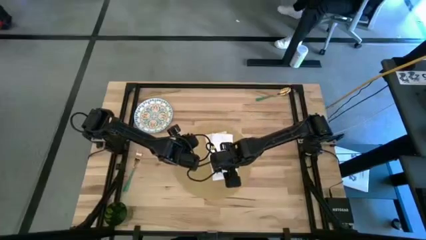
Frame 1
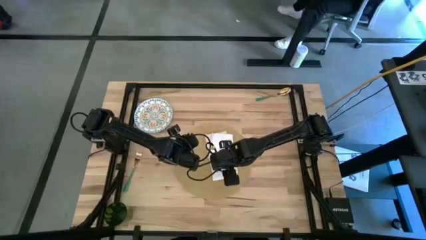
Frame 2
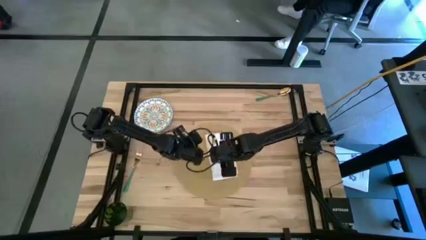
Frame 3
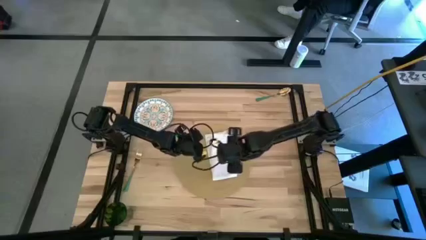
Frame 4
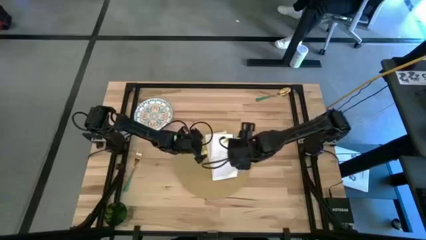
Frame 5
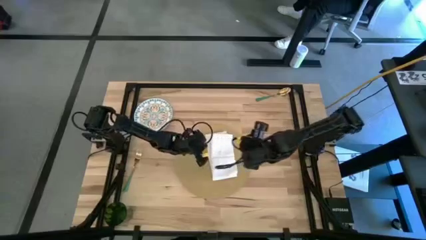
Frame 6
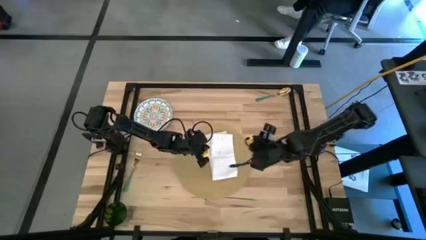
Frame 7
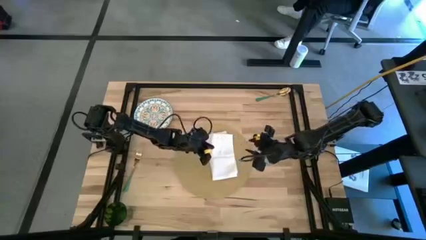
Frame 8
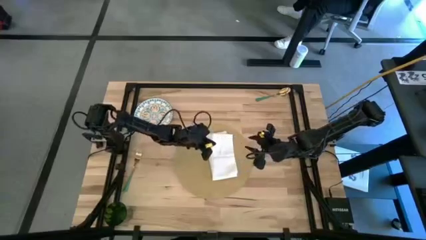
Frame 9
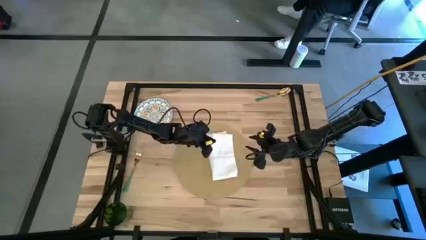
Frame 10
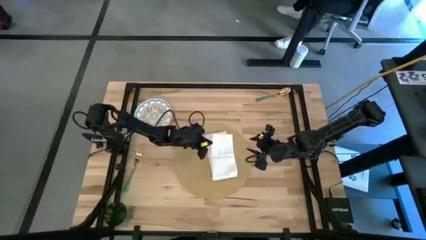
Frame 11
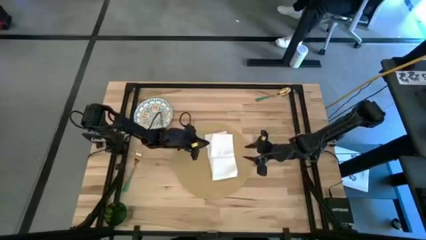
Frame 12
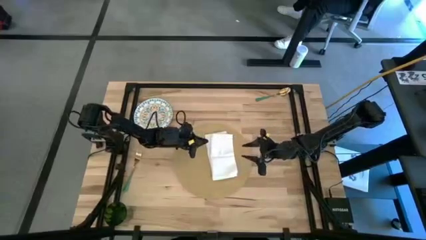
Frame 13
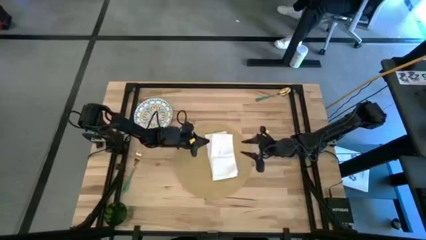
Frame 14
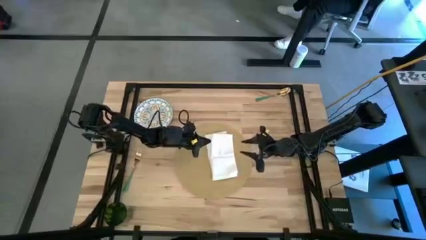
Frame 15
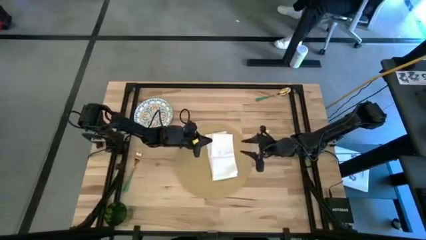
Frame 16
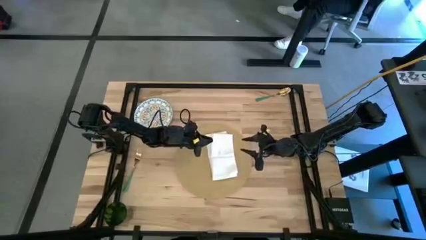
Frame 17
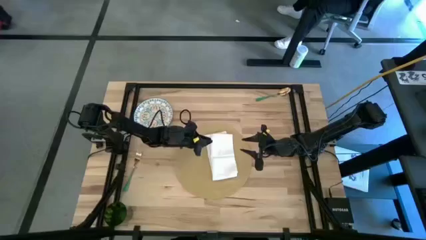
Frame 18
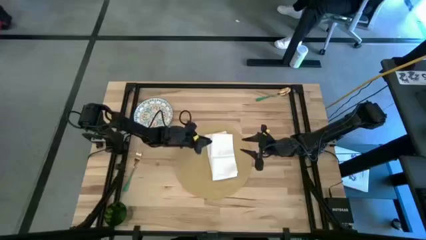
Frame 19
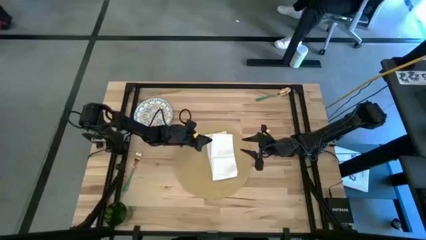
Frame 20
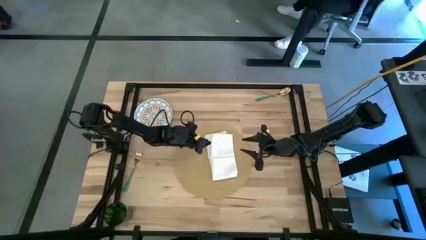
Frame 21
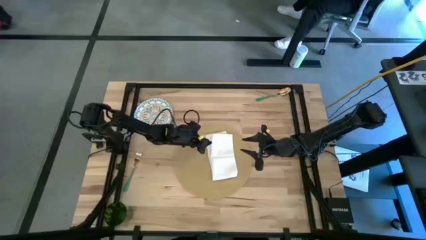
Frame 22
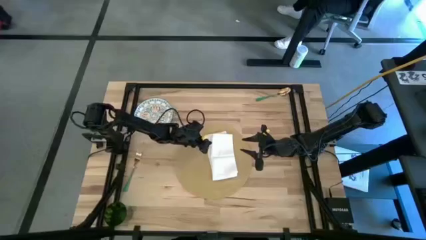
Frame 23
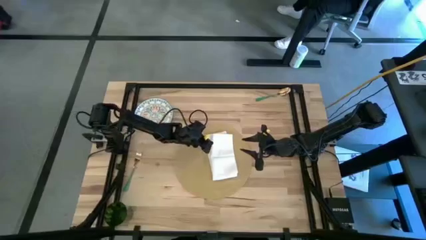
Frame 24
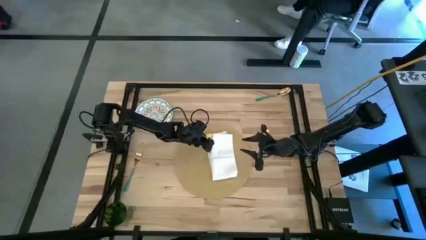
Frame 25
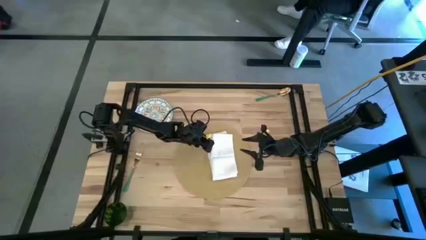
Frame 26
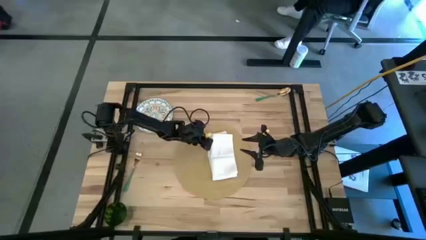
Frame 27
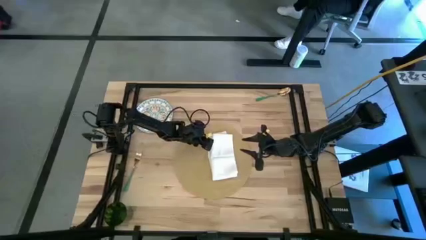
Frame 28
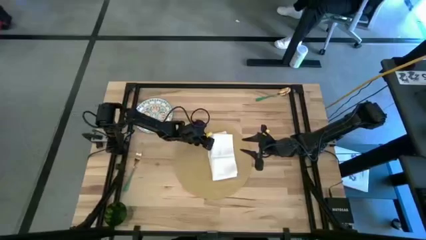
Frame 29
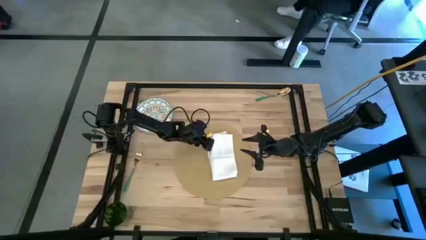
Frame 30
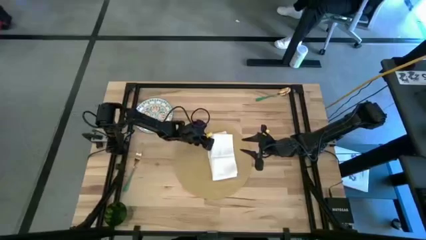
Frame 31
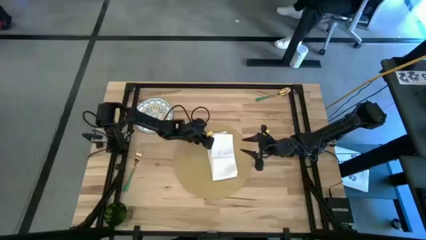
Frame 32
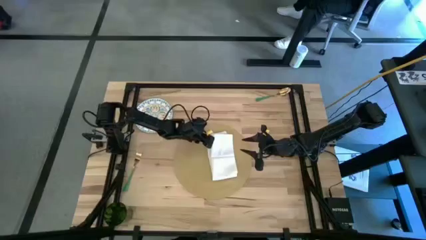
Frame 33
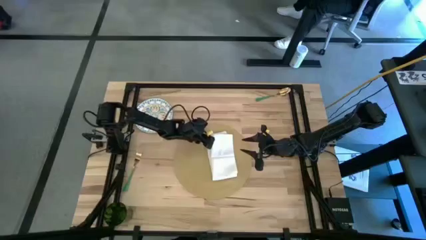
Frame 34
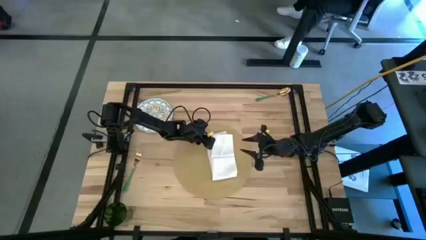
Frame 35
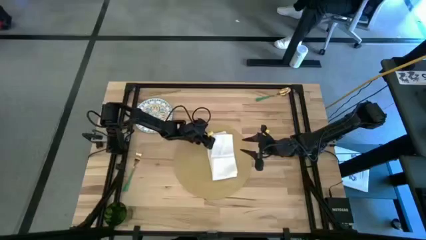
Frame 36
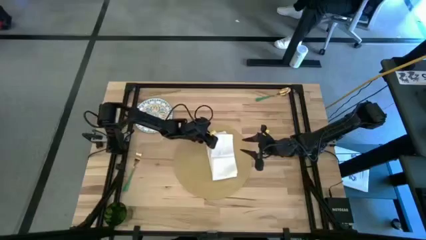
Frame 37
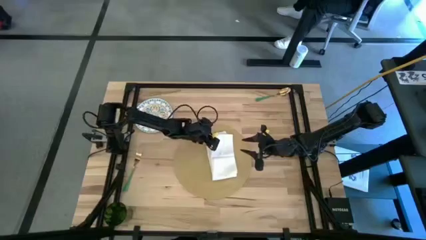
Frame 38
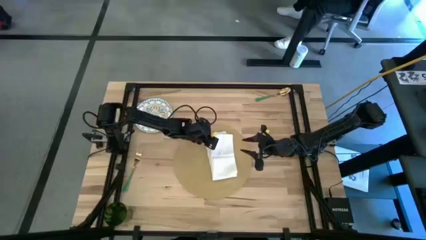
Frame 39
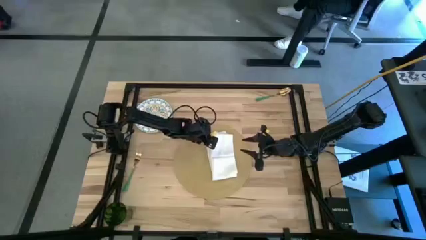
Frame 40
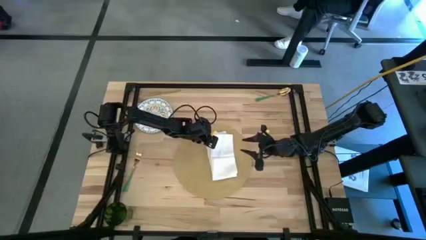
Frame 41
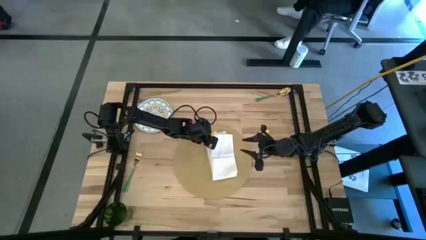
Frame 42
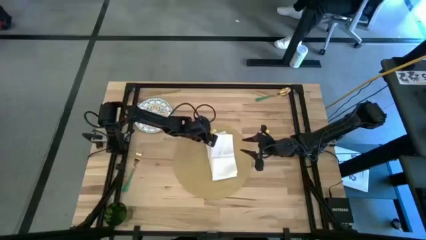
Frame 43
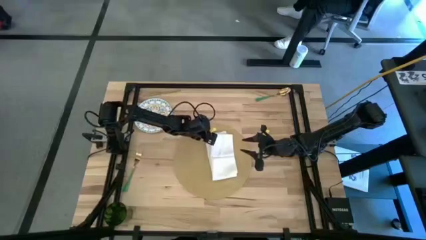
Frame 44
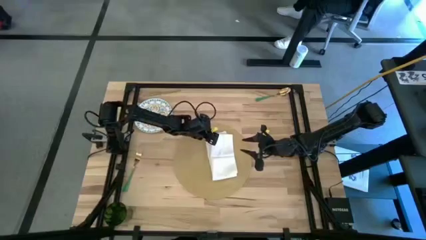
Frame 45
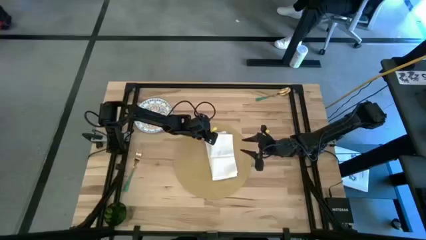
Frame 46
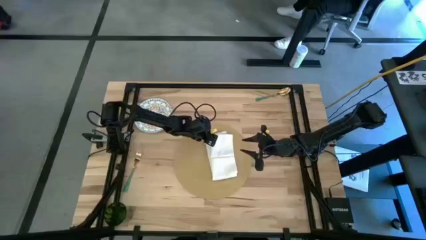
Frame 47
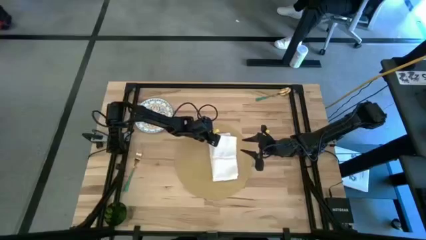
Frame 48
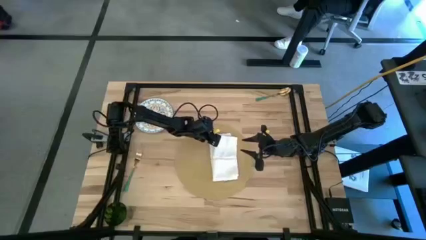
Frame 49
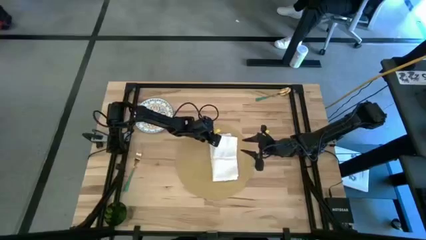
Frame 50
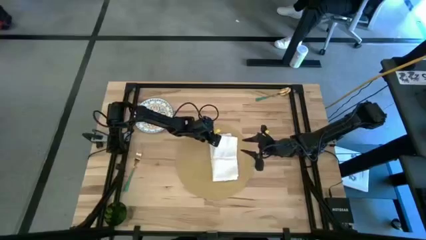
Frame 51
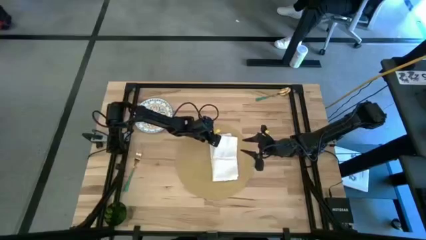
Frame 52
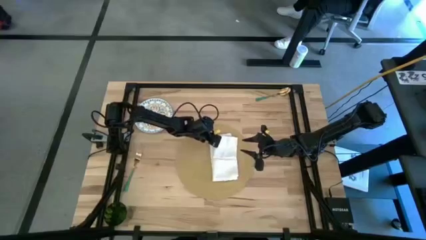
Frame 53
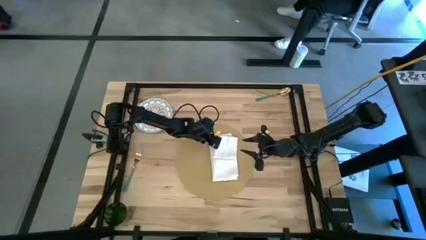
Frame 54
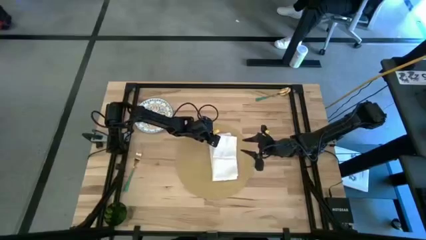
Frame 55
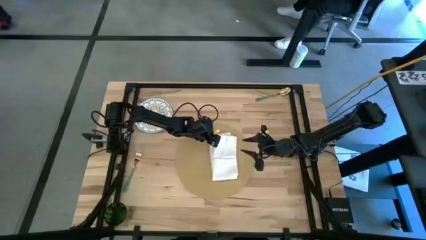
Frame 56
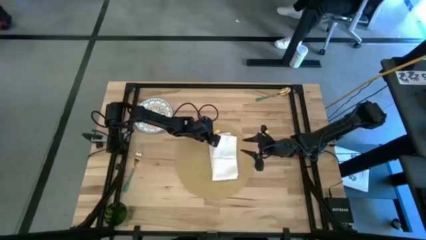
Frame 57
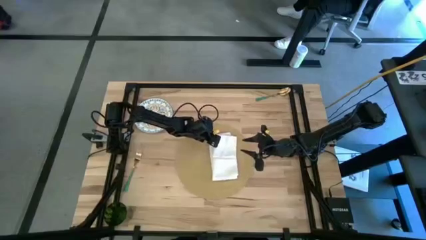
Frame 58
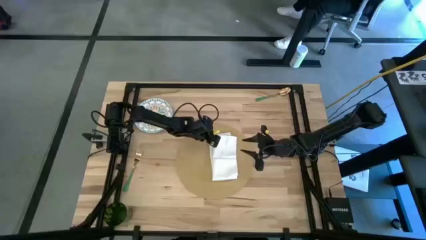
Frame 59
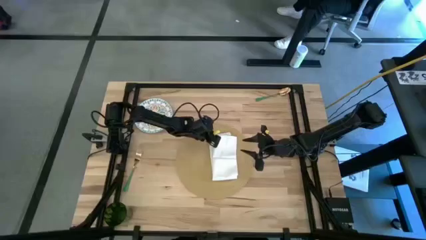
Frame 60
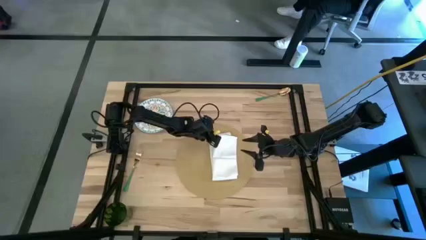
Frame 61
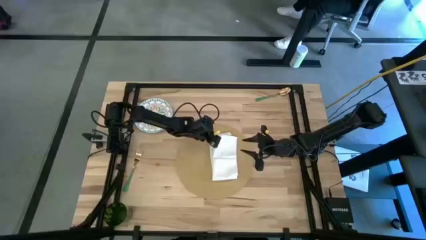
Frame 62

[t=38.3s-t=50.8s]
Task: Set table place
Fold the table napkin

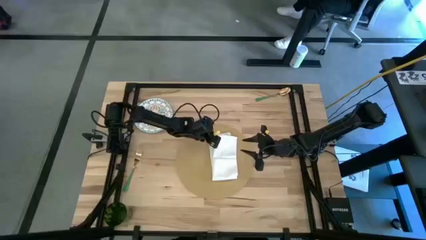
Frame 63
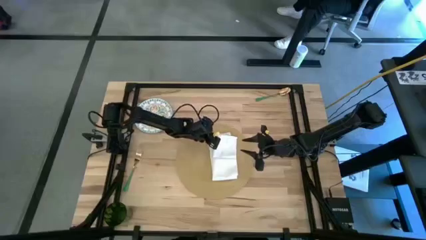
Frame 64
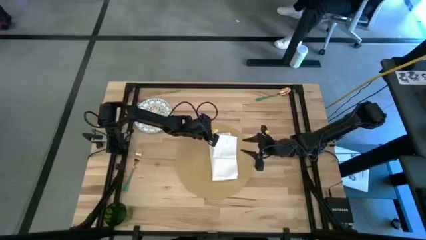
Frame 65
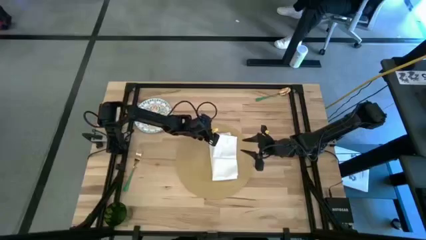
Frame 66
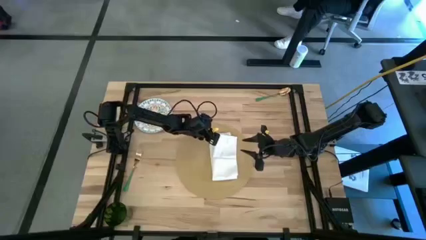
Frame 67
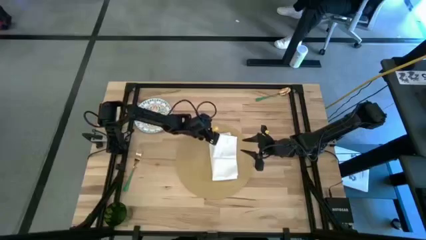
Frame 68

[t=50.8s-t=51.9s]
Fold the table napkin
